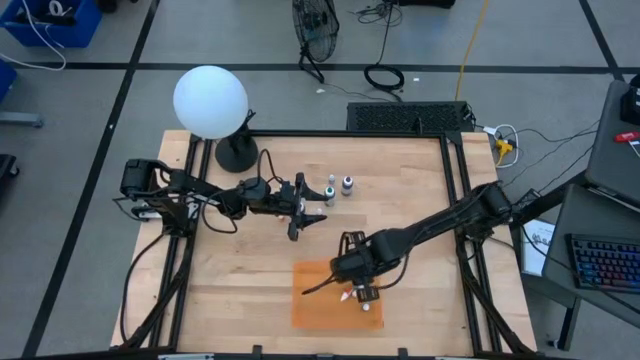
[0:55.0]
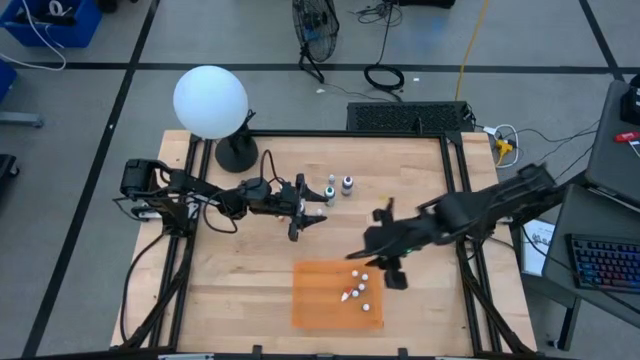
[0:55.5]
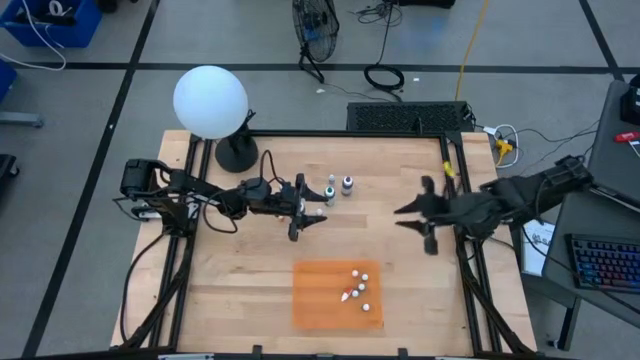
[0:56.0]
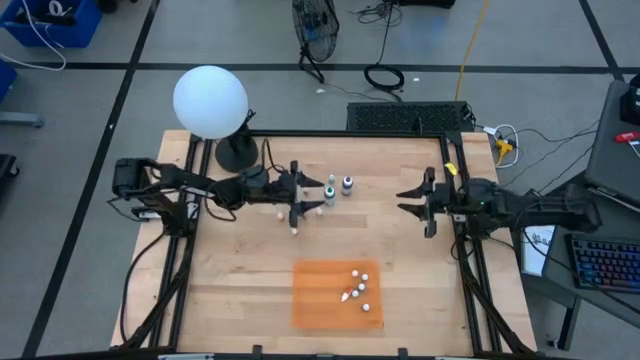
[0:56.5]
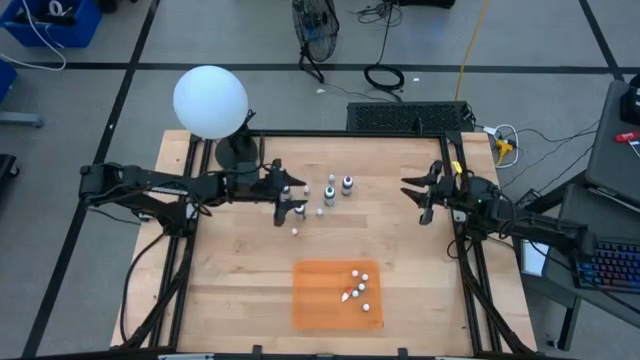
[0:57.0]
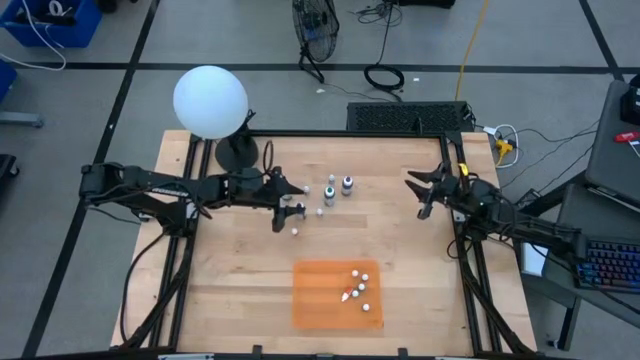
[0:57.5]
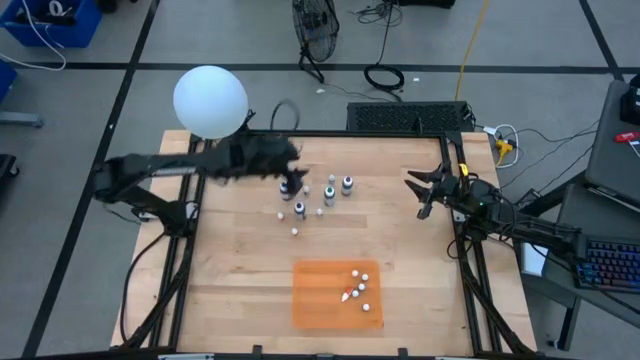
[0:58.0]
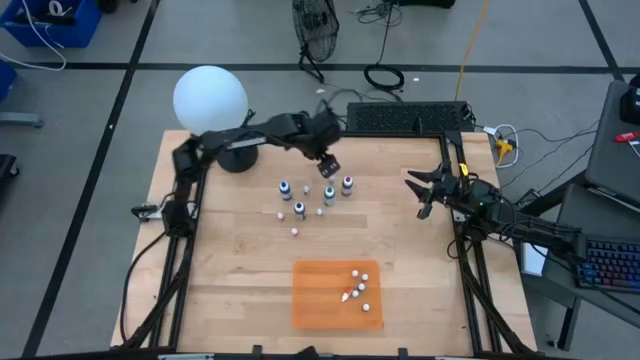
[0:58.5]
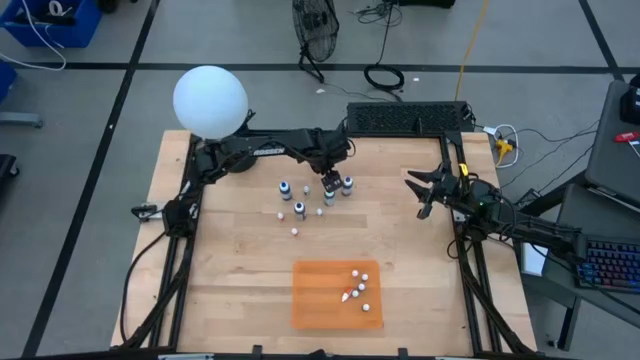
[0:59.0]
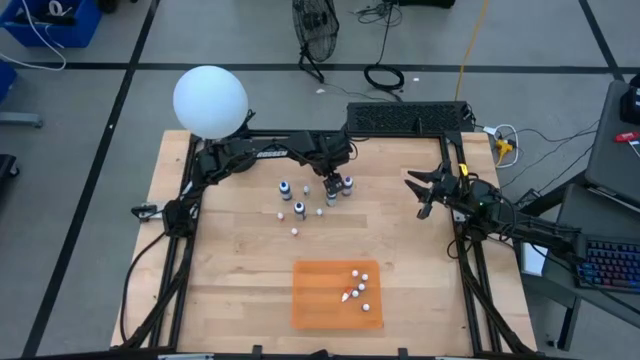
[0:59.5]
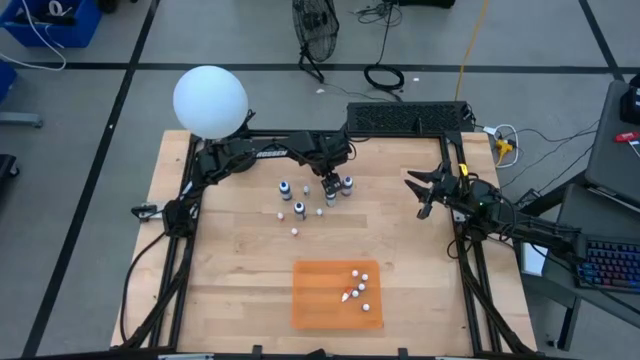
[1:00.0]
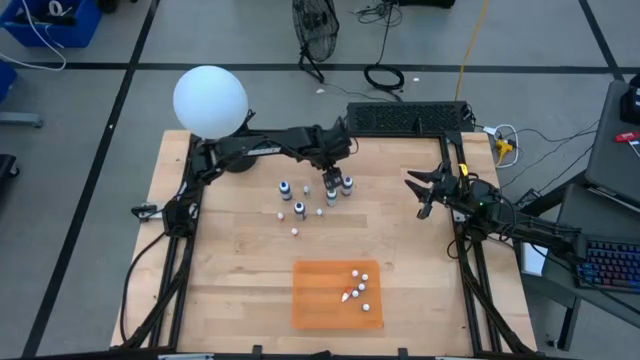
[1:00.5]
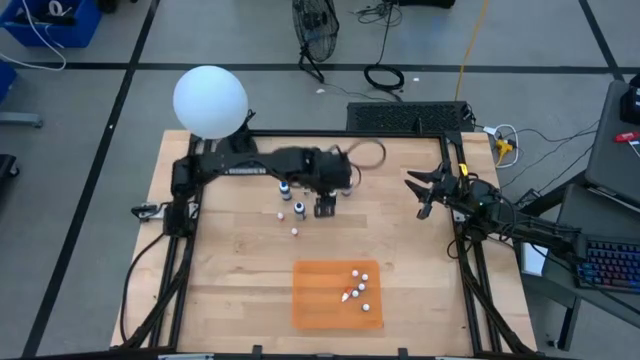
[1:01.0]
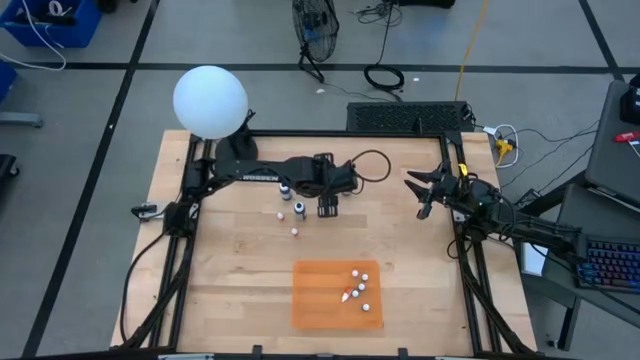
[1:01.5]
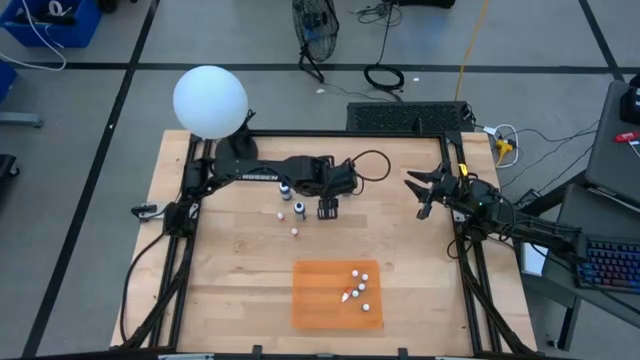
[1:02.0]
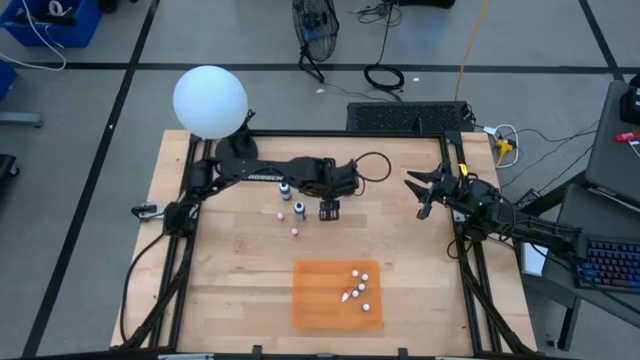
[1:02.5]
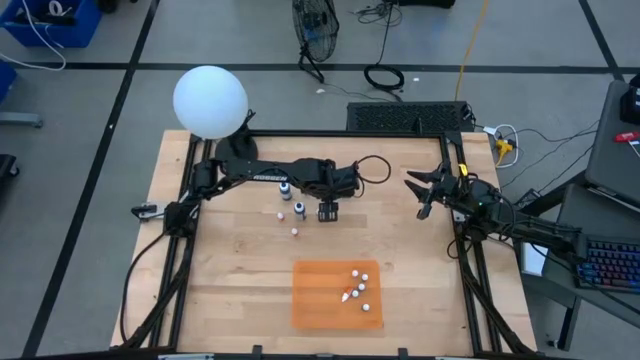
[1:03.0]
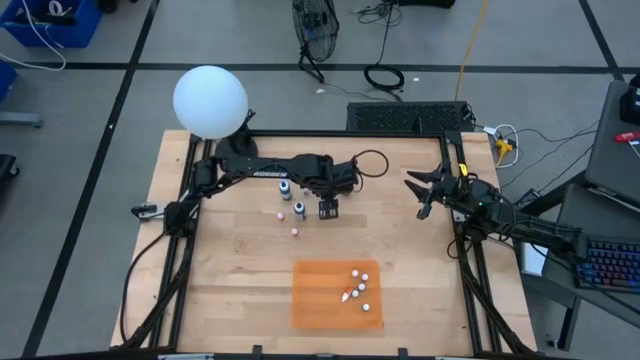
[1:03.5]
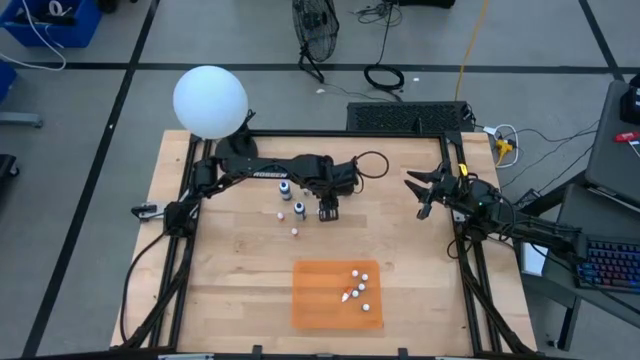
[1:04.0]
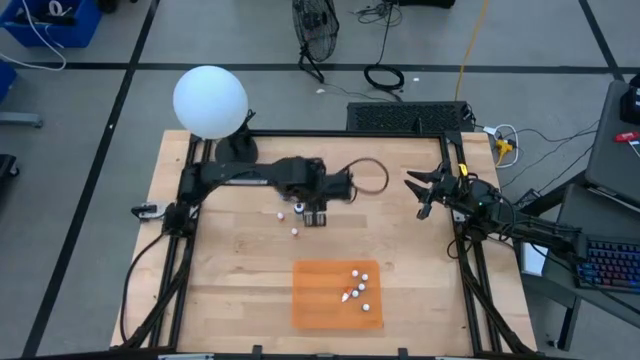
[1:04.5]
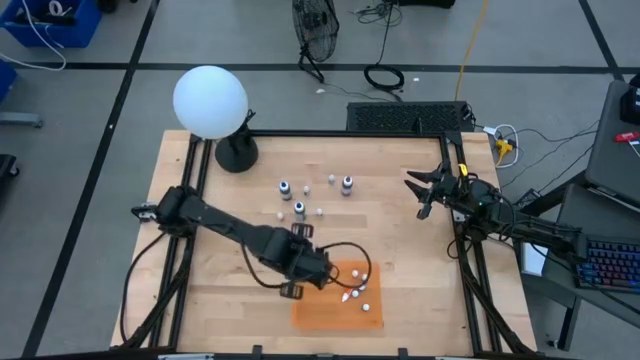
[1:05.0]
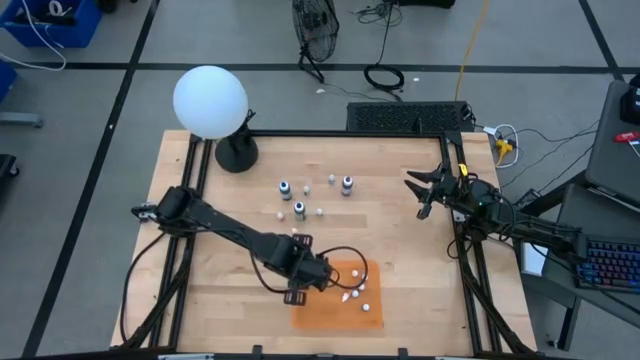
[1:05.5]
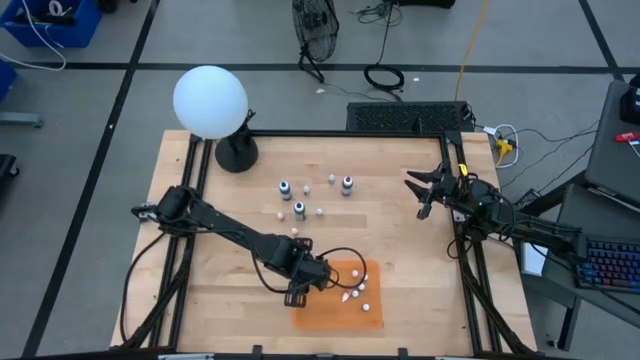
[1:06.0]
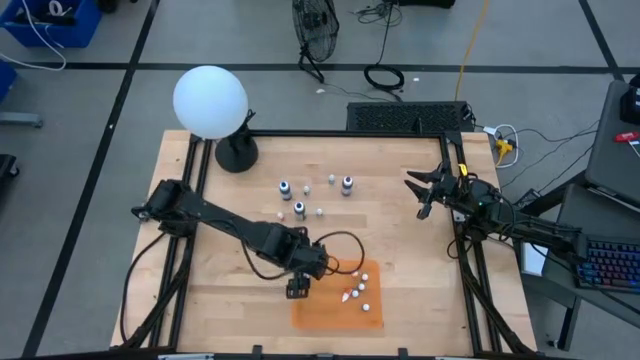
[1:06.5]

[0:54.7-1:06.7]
Task: Pick & Place food coloring
Put the large green food coloring bottle into the orange container

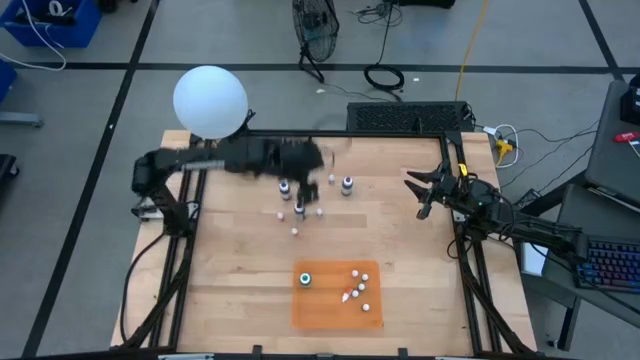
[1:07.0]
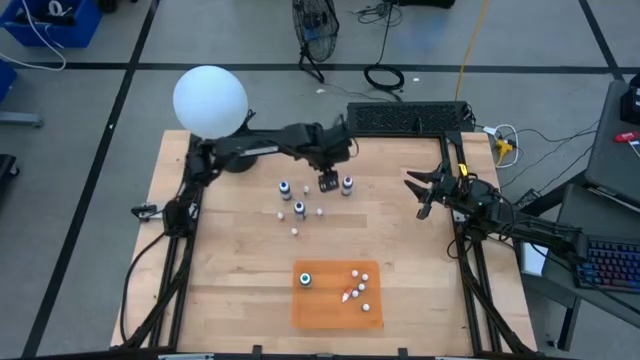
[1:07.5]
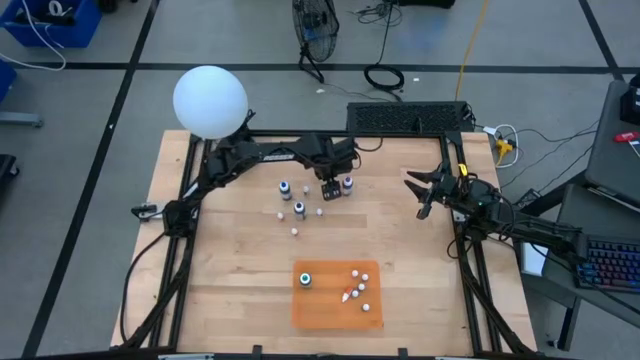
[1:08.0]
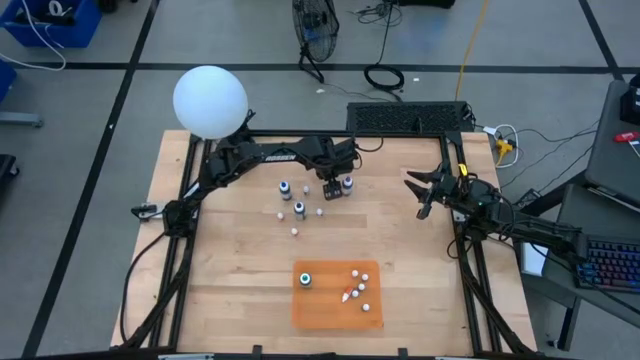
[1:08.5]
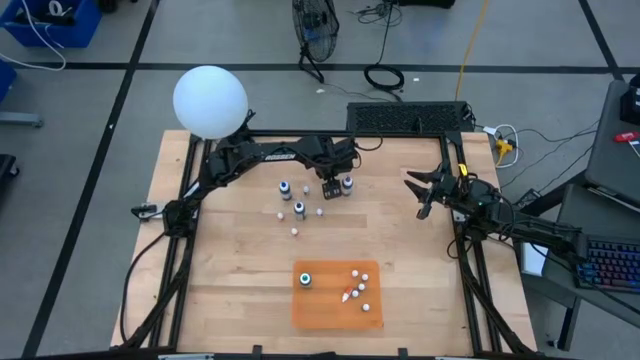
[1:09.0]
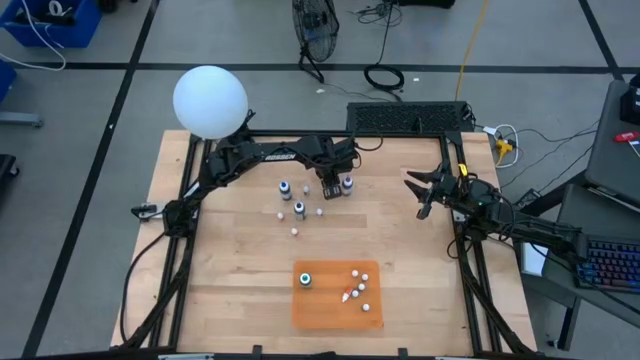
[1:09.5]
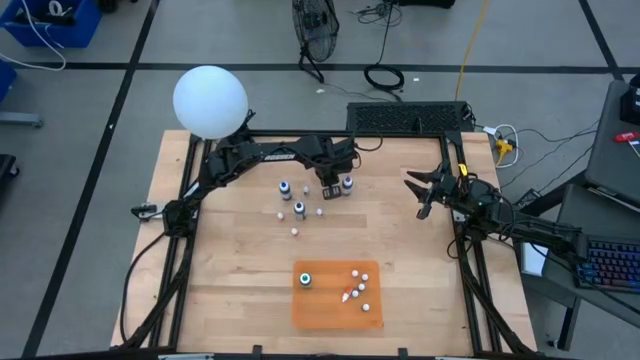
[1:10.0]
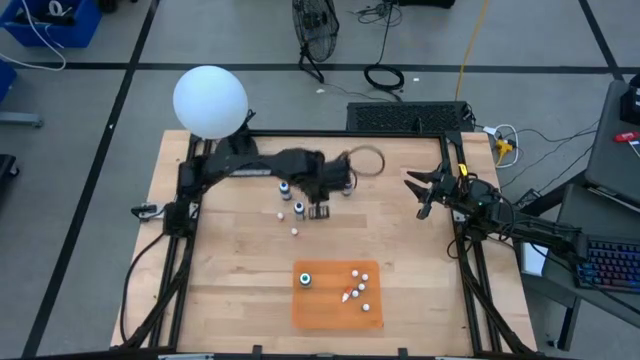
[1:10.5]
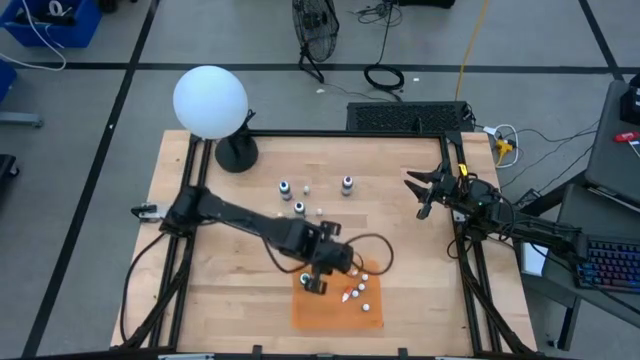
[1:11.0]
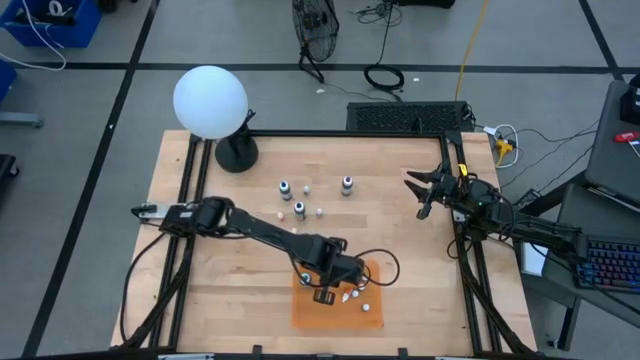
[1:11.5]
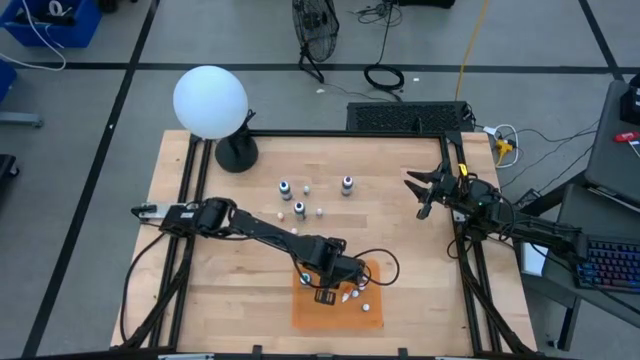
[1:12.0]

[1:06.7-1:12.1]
Put the small black food coloring bottle into the orange container

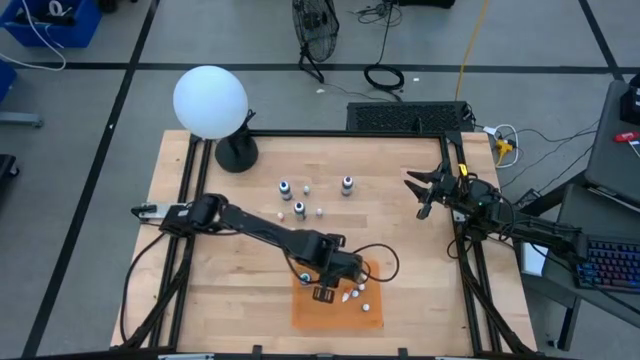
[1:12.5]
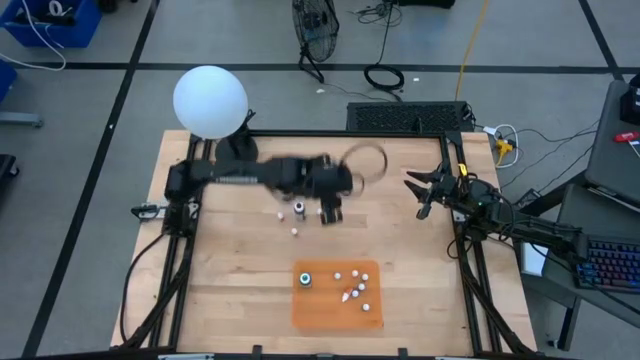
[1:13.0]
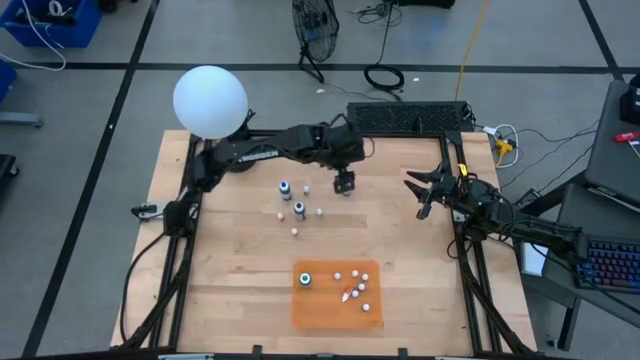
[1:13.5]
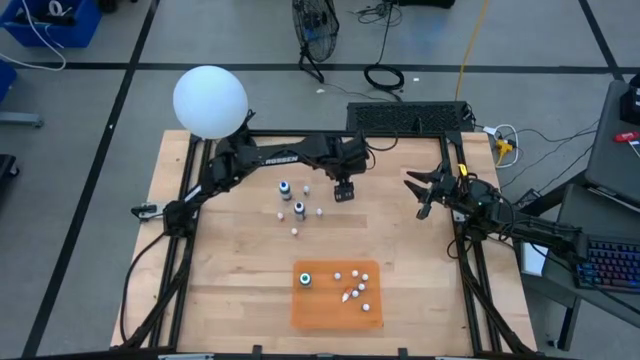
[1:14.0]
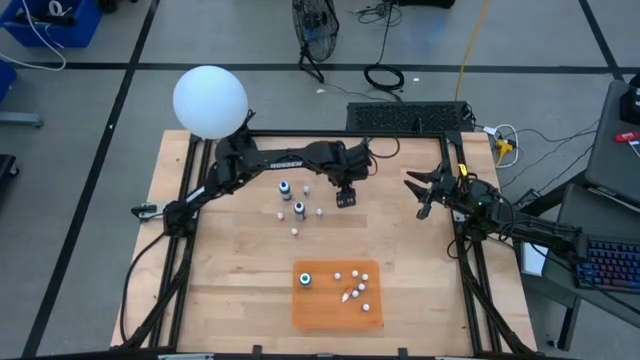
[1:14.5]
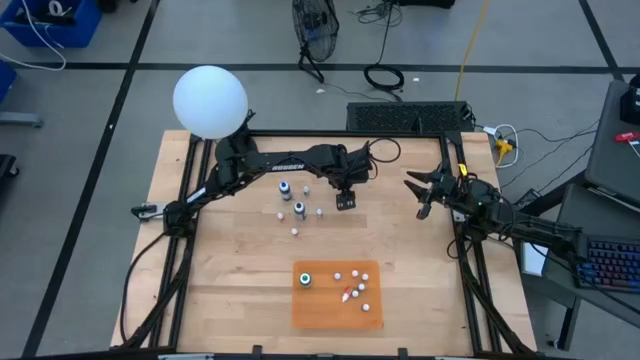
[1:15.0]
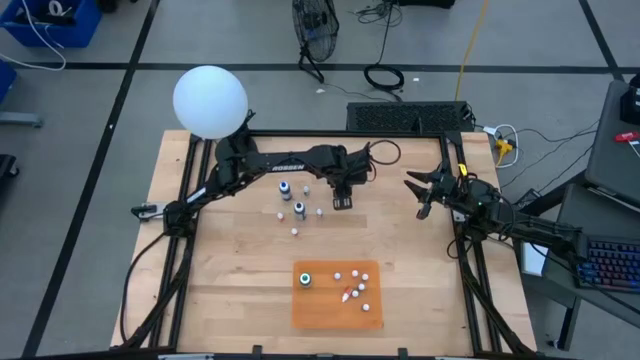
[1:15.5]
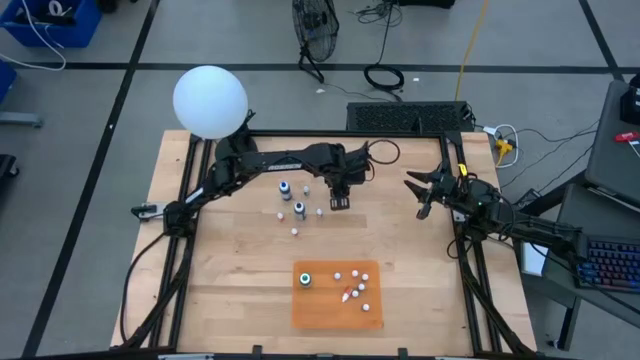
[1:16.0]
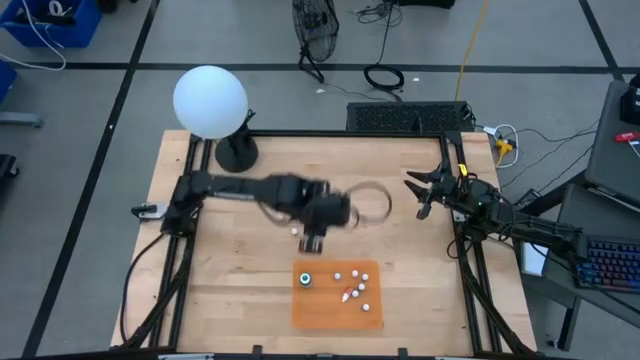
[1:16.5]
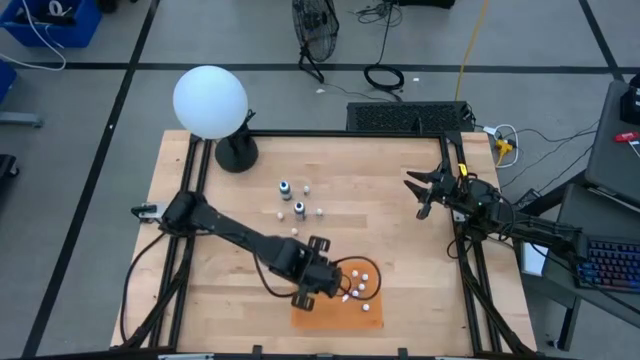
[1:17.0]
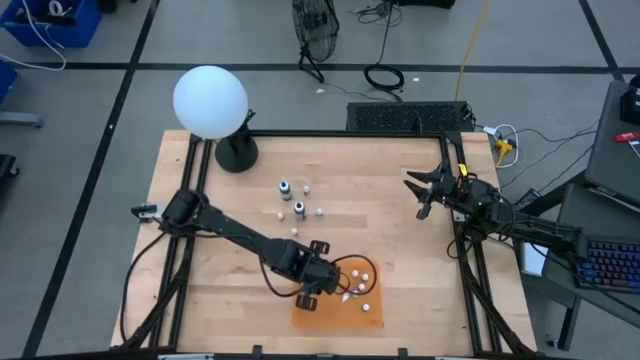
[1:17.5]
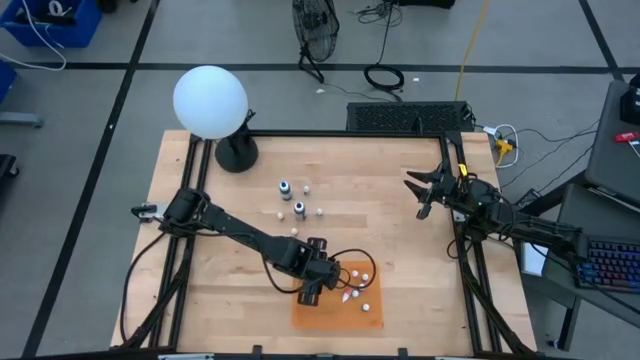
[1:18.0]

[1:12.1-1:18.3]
Put the large purple food coloring bottle into the orange container
